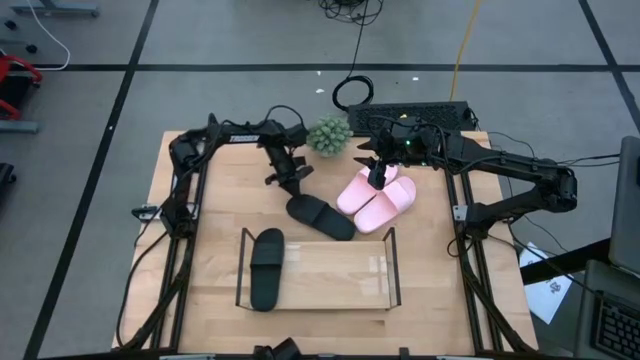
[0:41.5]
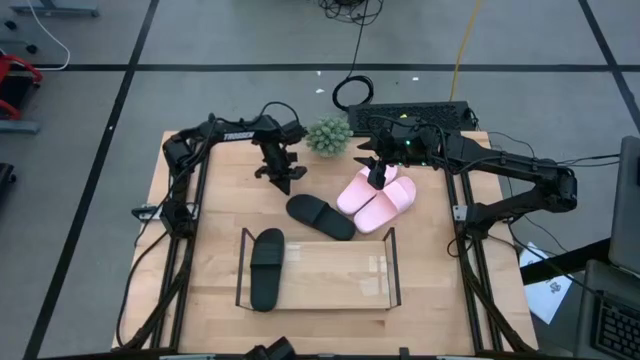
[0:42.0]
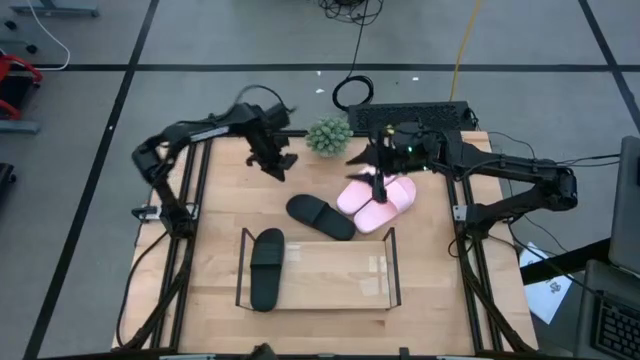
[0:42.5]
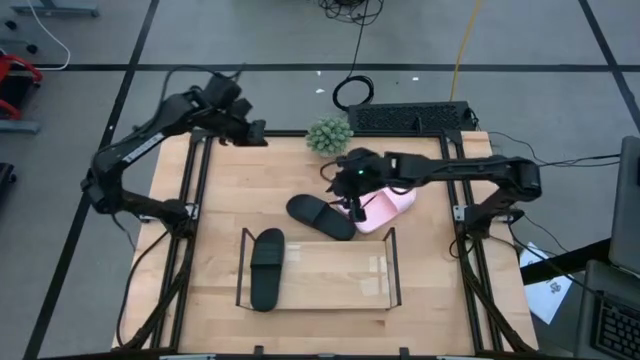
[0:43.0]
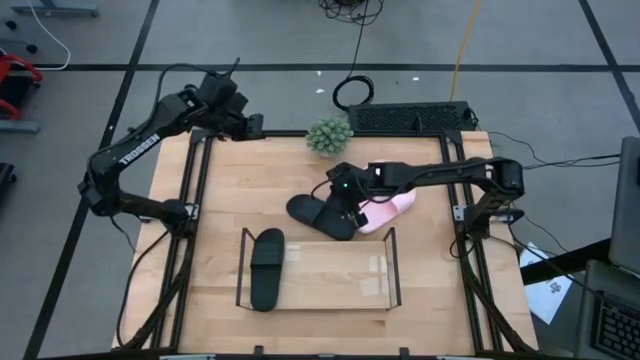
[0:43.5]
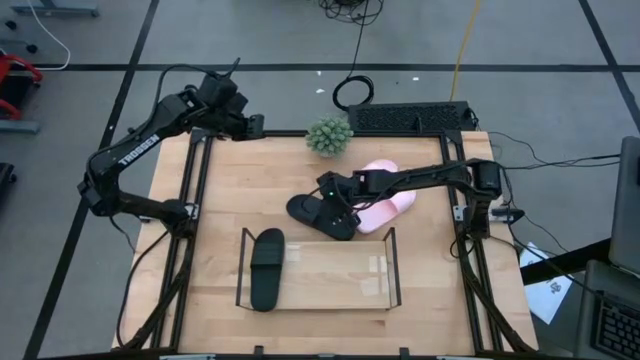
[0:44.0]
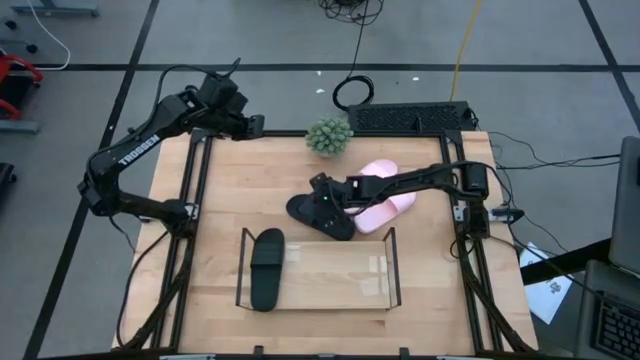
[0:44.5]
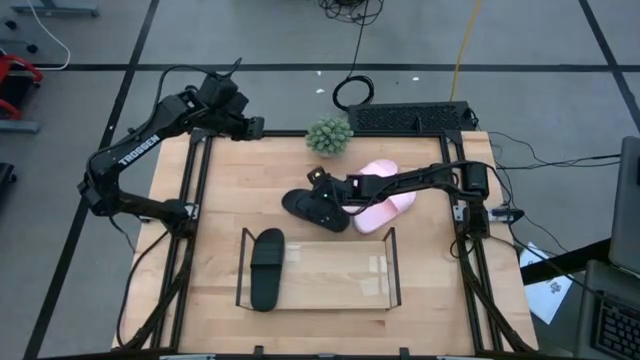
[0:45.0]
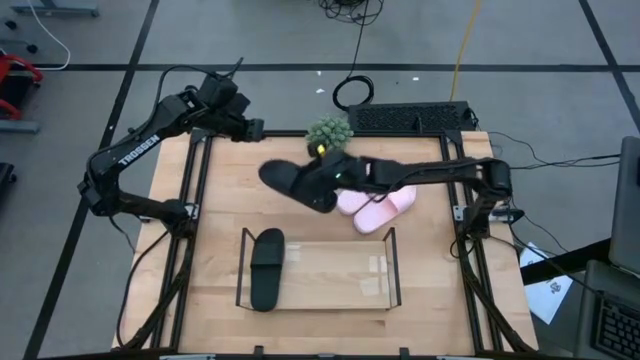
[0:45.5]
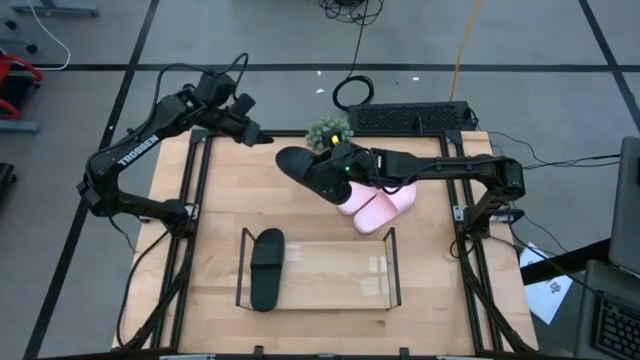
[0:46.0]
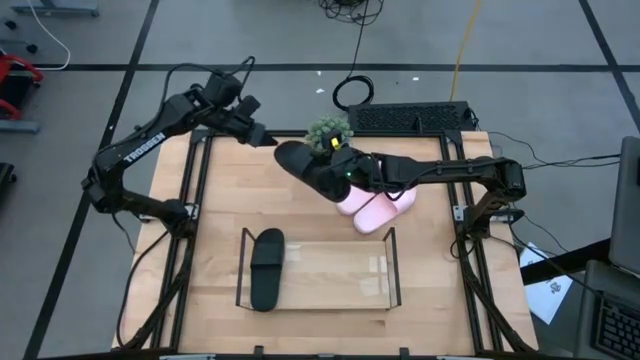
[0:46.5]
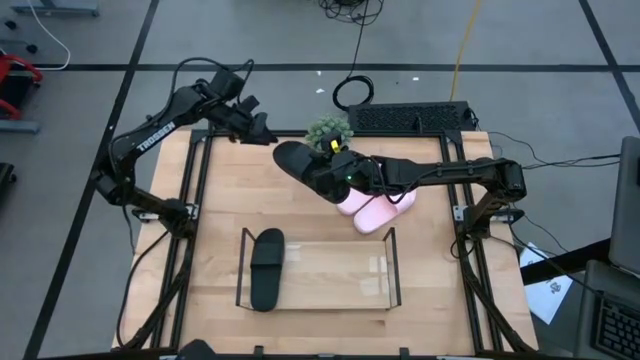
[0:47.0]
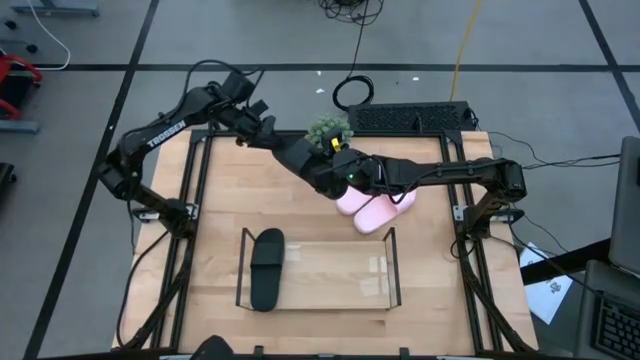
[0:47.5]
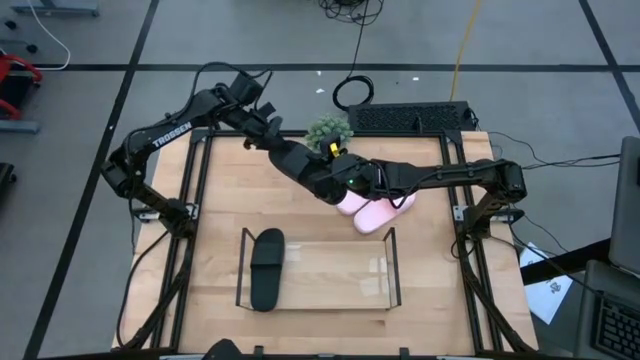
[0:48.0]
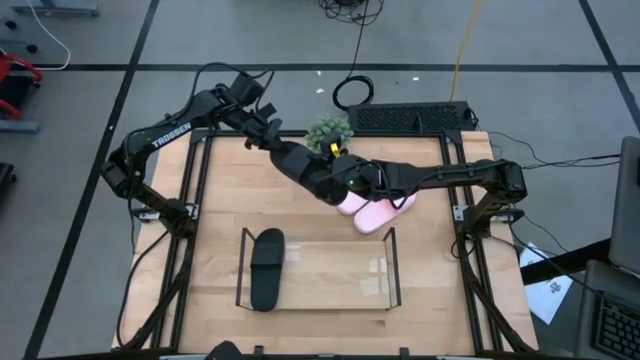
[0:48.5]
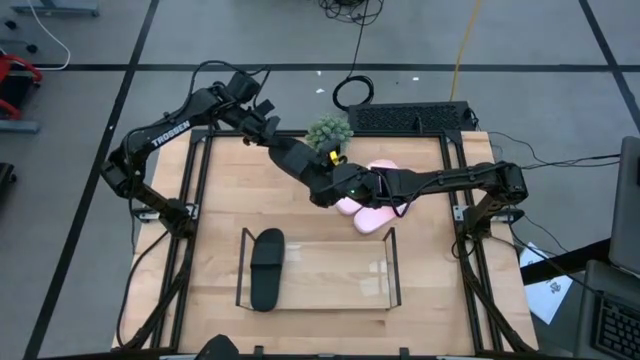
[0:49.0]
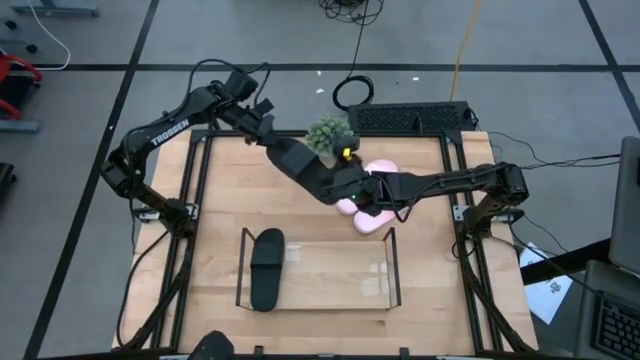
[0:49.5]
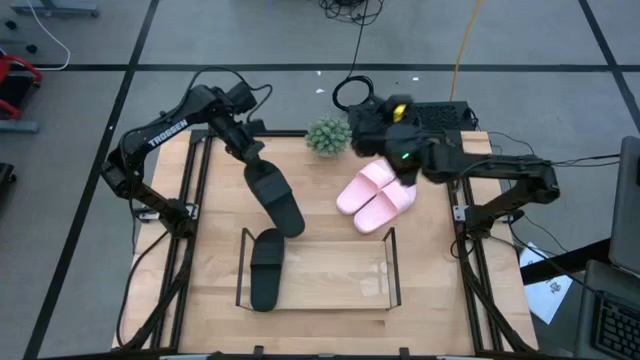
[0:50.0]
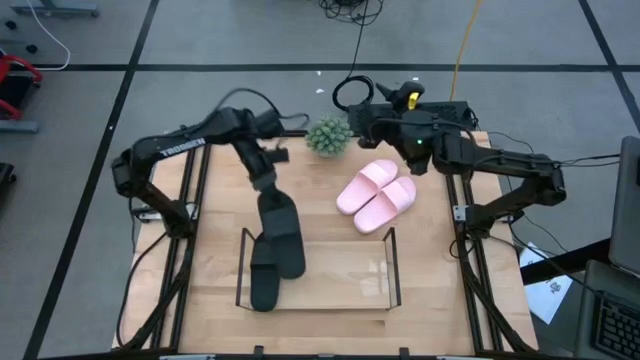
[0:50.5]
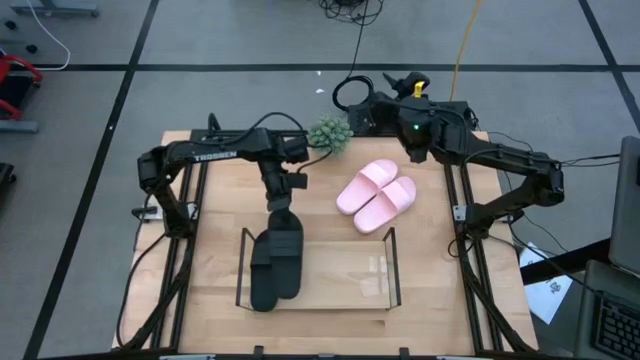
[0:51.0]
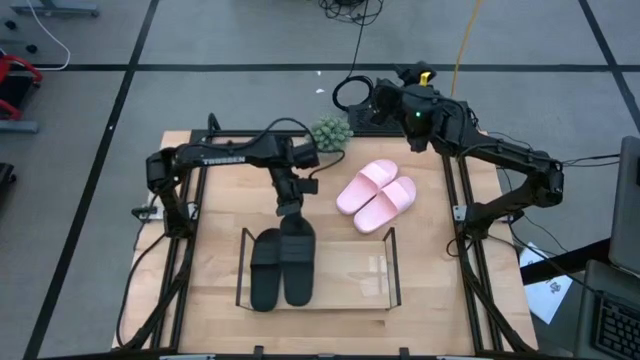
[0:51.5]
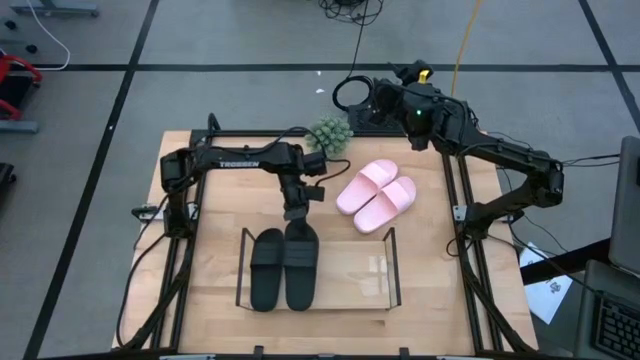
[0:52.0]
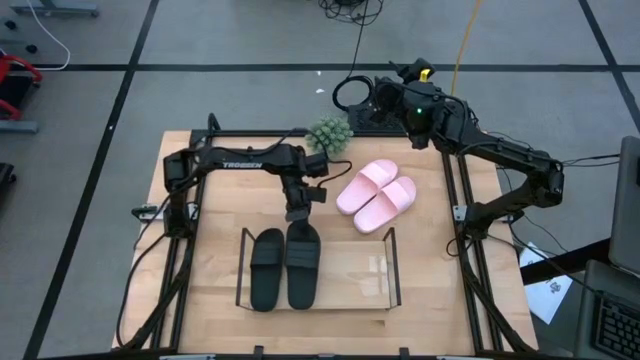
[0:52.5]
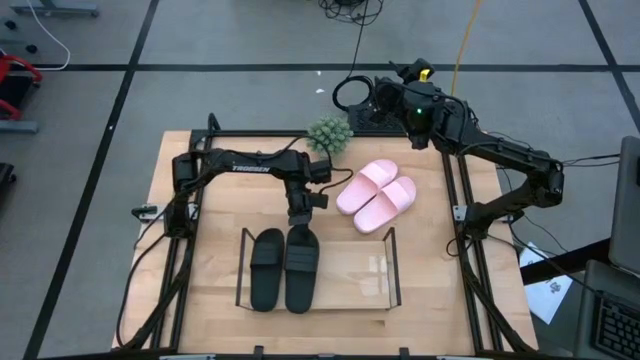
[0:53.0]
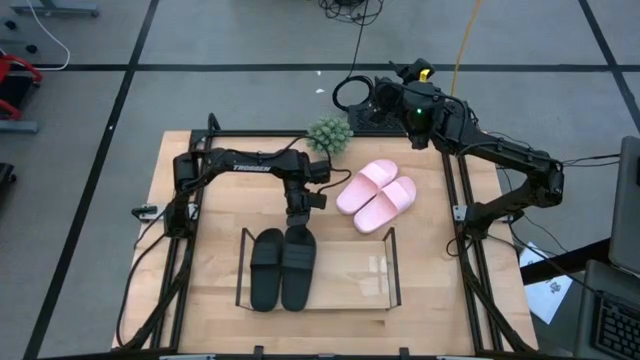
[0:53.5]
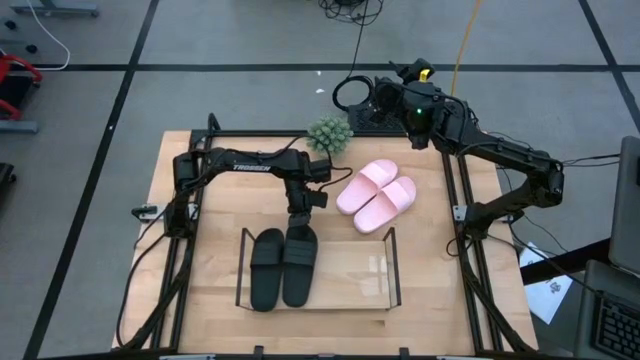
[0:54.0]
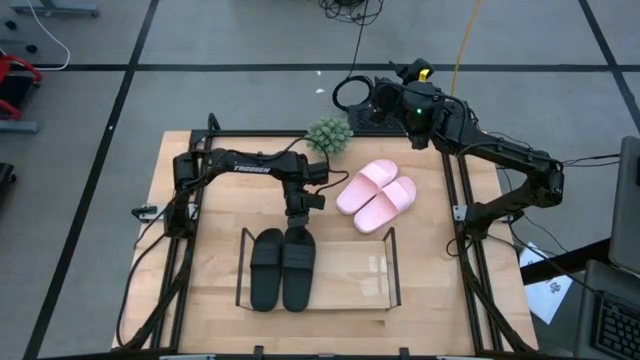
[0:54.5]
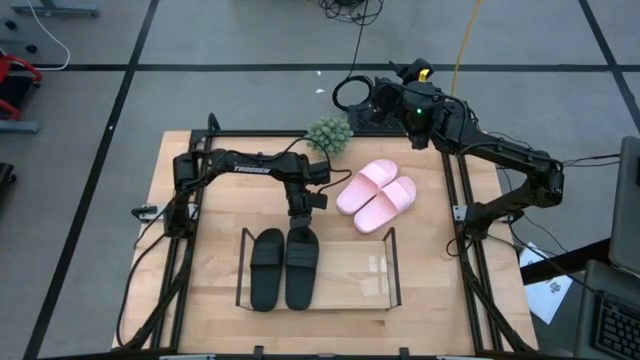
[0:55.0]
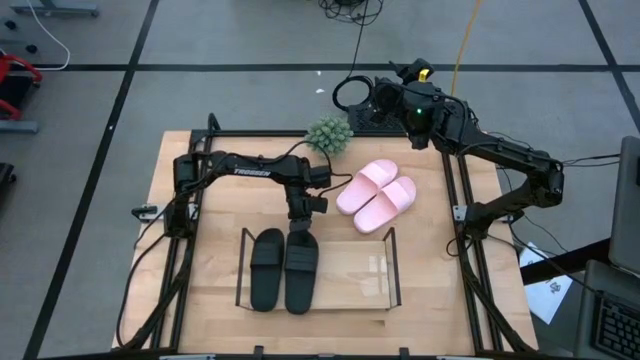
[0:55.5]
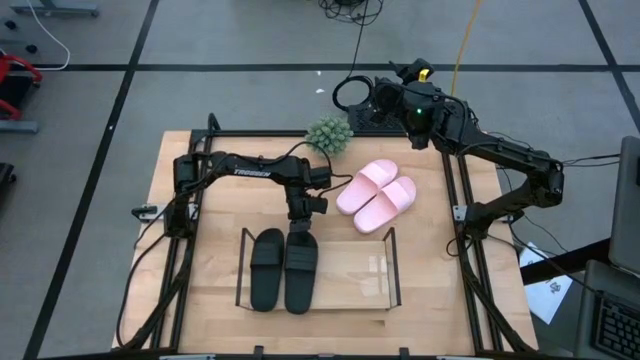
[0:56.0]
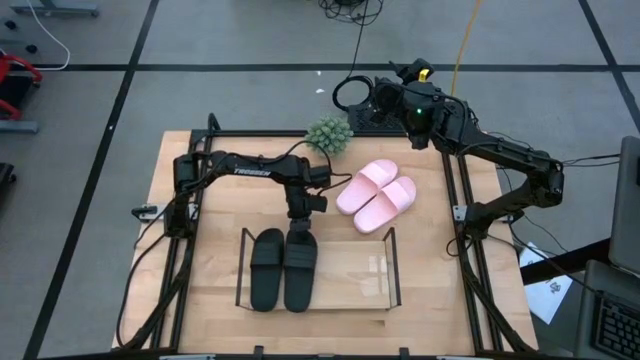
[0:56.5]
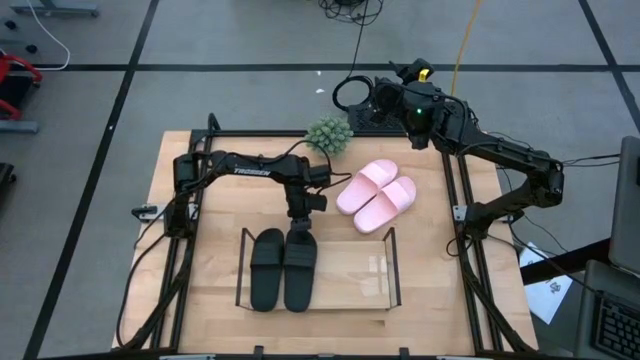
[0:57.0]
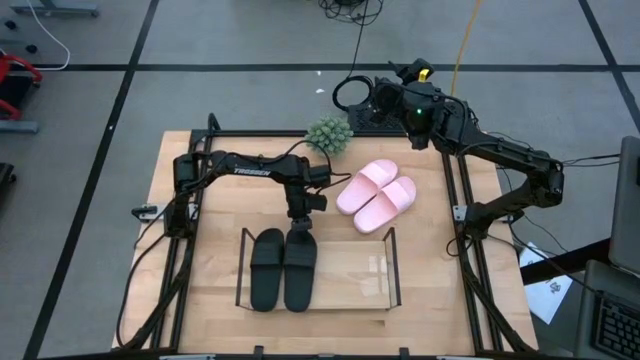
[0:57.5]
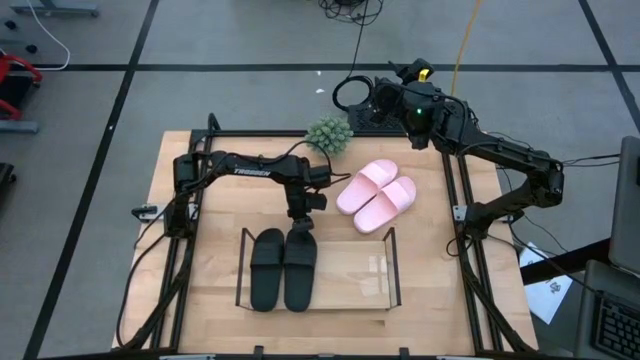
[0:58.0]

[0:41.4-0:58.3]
Task: Pick and place slides into the shelf
Put the black slipper on the shelf

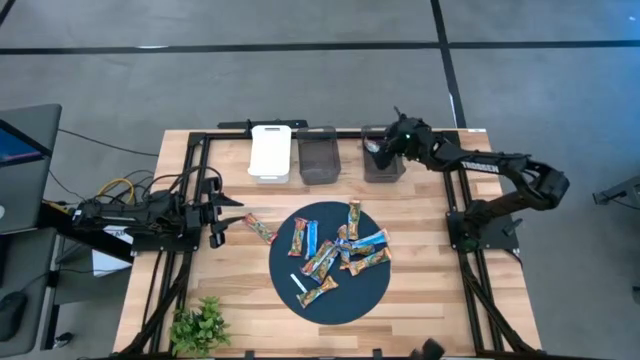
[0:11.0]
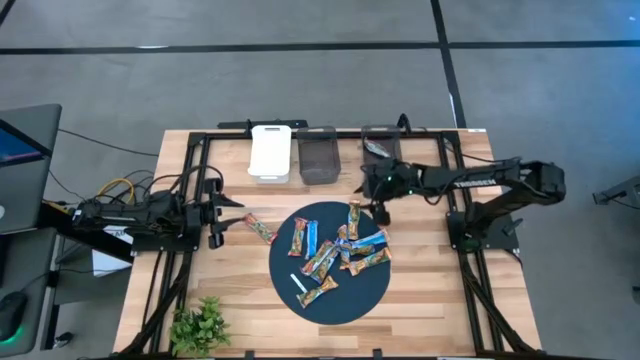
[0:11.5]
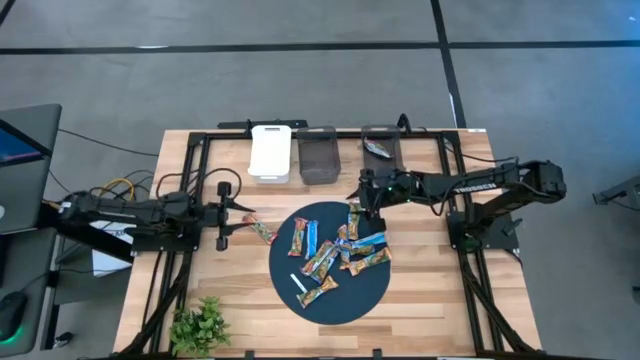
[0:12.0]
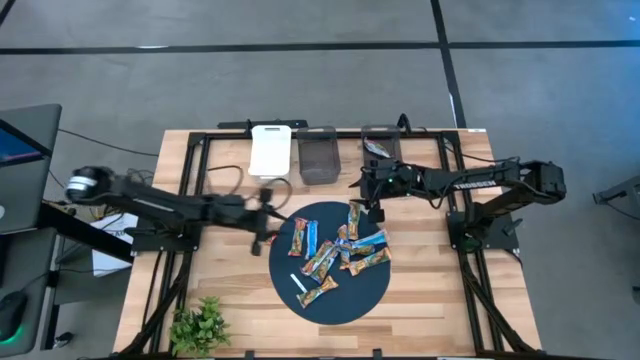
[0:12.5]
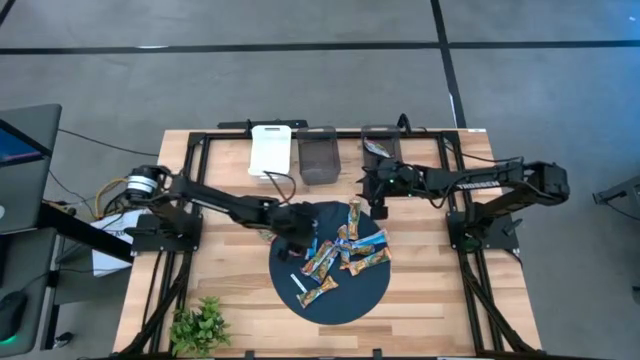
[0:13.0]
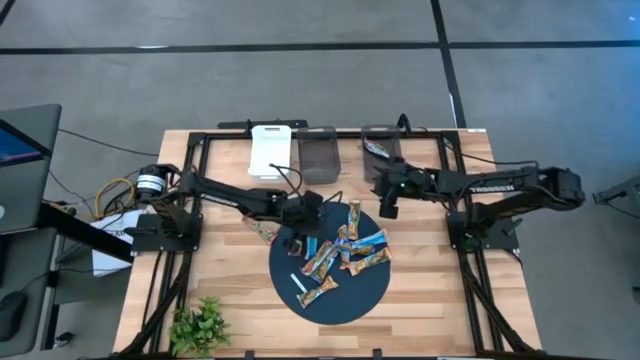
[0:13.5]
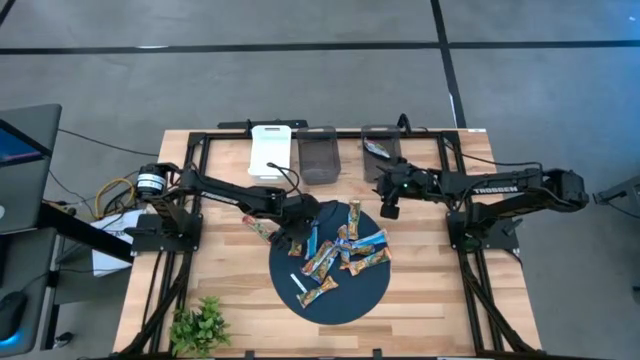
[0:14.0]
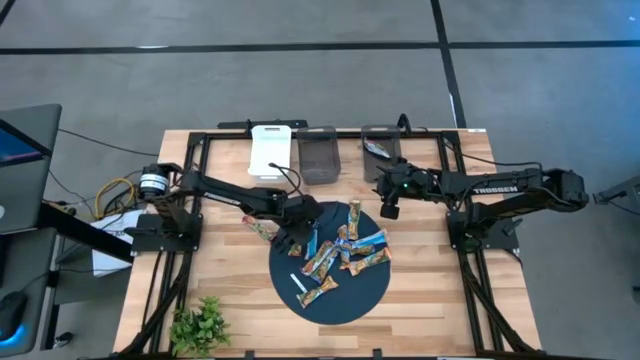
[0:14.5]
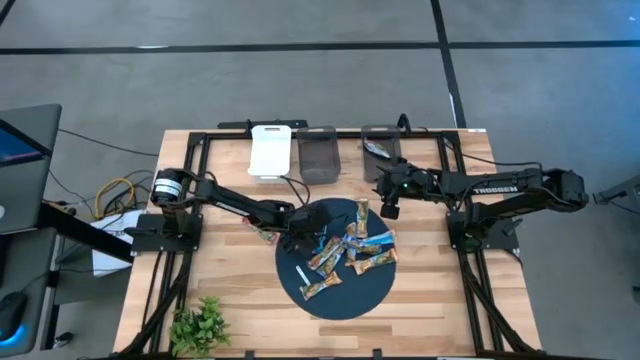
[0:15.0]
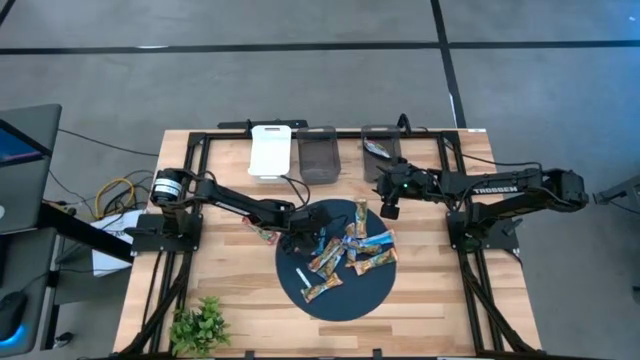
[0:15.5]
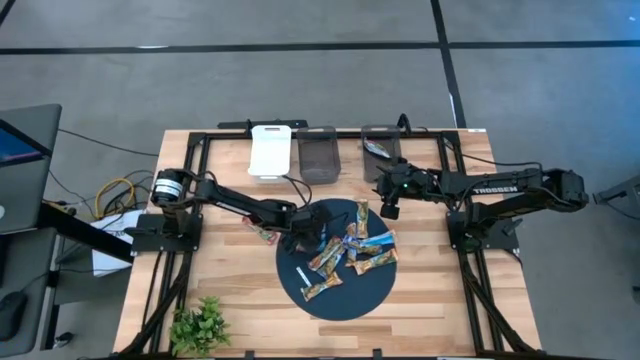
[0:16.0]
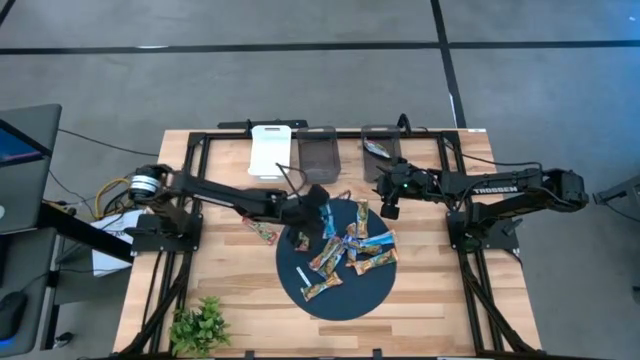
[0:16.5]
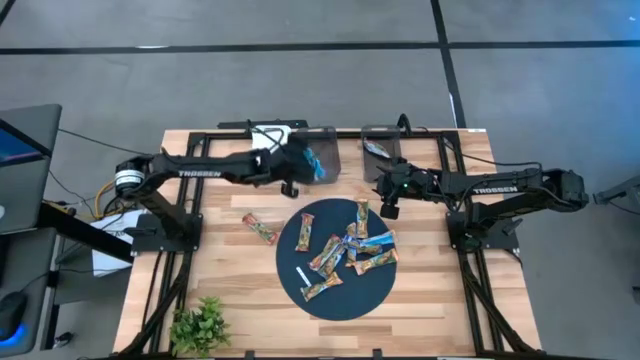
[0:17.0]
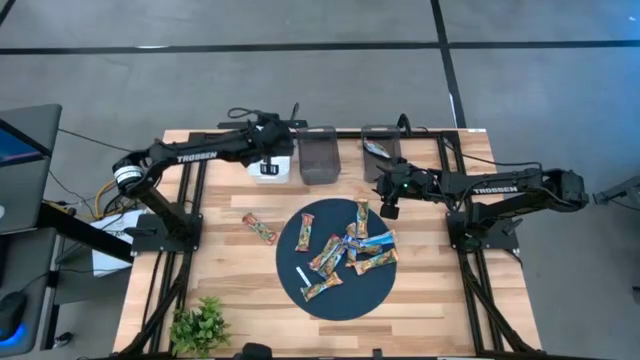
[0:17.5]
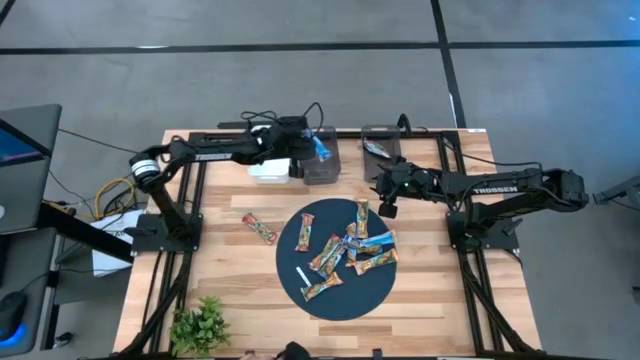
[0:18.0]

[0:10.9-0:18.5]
Task: Pick and place Granola Bars by type
Put the left blue granola bar into the left black bin
